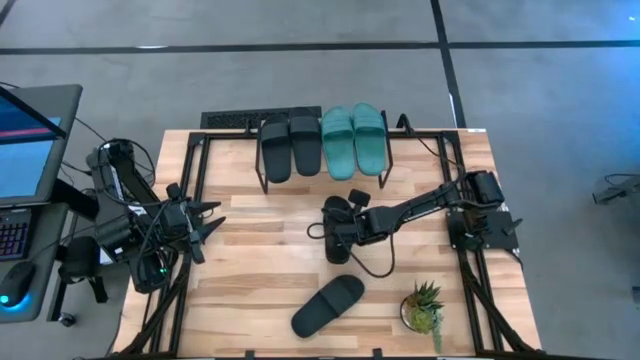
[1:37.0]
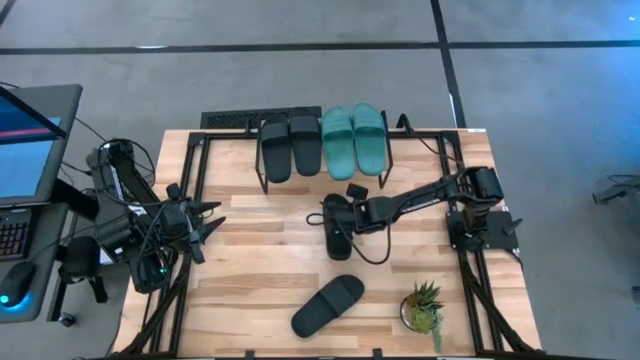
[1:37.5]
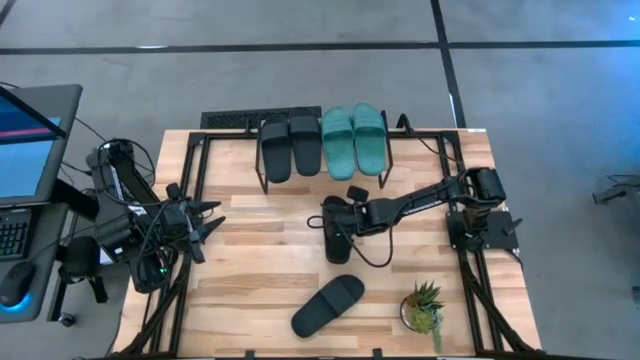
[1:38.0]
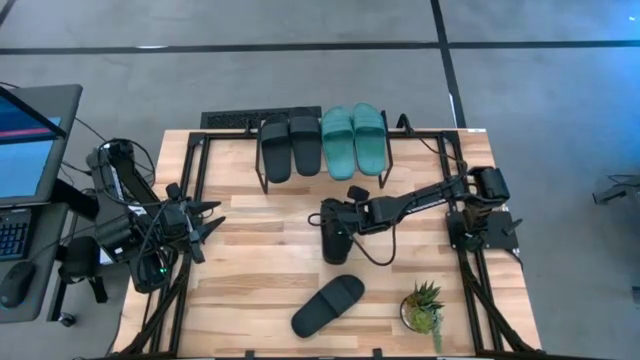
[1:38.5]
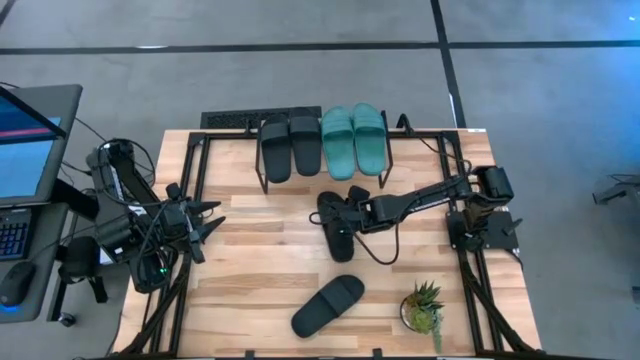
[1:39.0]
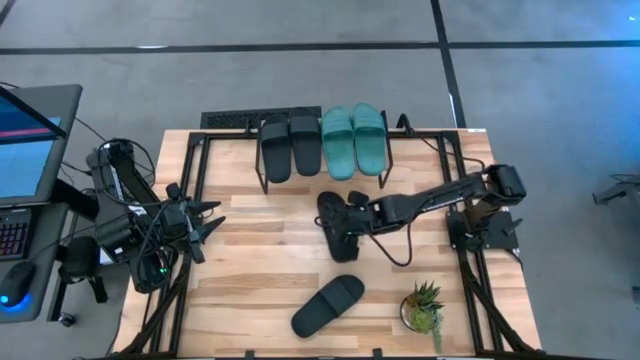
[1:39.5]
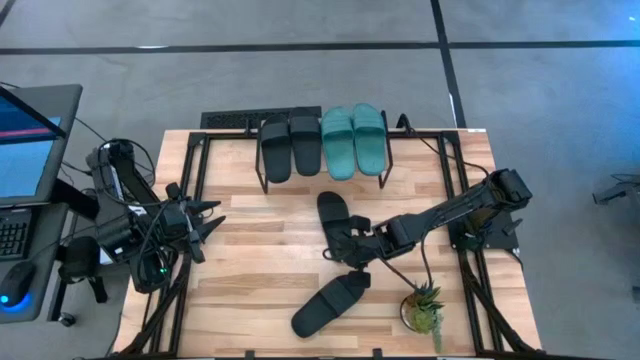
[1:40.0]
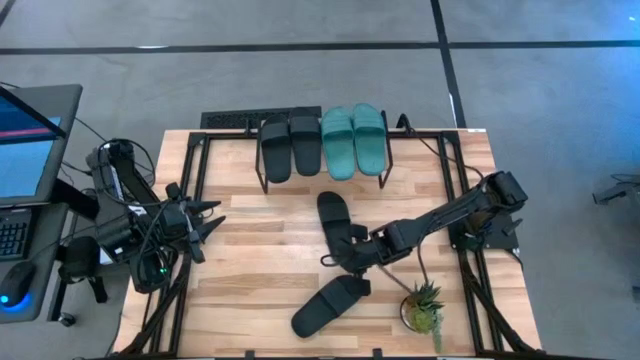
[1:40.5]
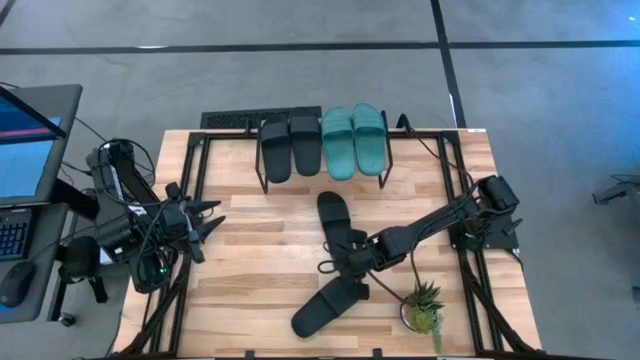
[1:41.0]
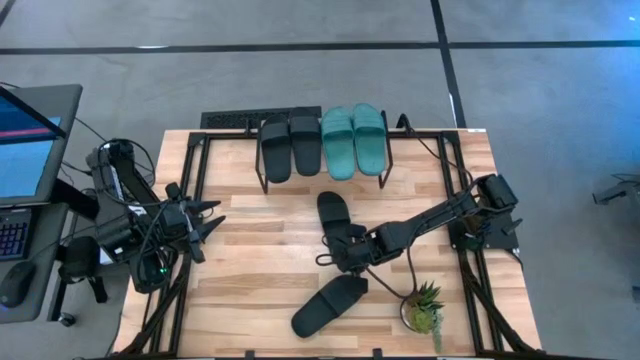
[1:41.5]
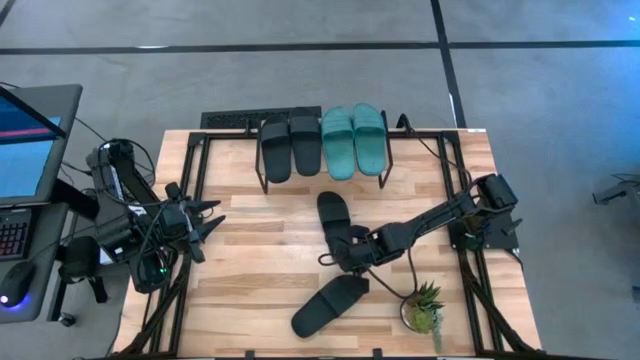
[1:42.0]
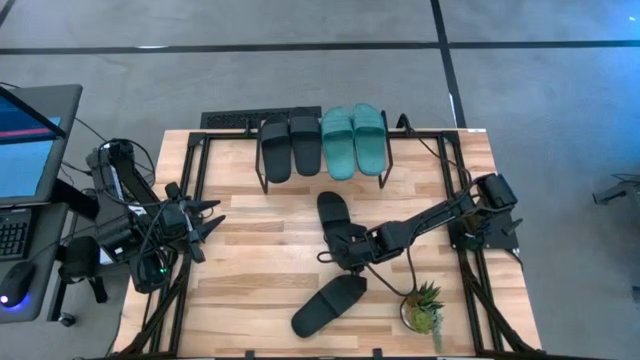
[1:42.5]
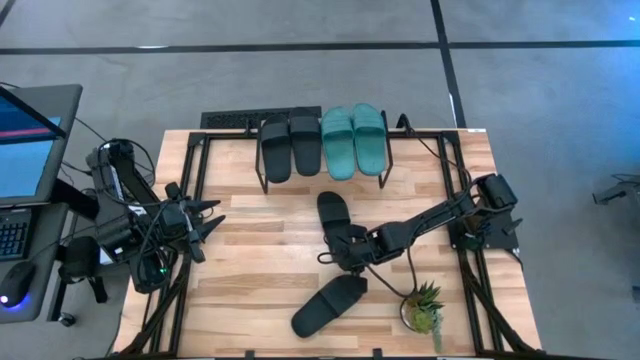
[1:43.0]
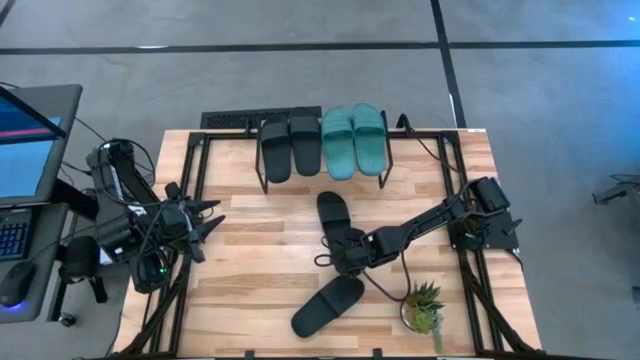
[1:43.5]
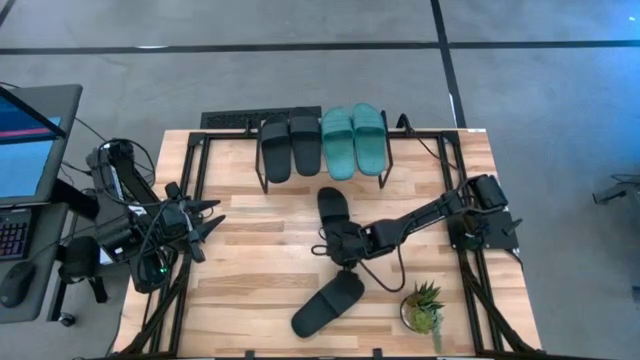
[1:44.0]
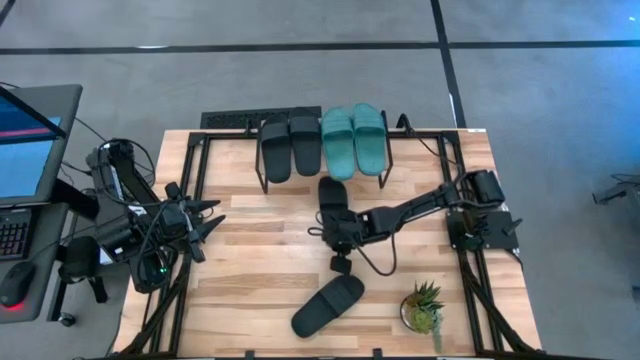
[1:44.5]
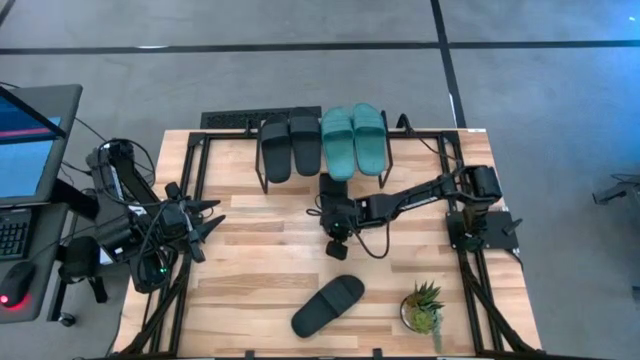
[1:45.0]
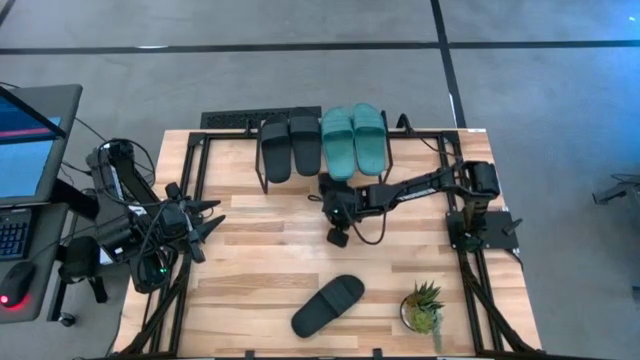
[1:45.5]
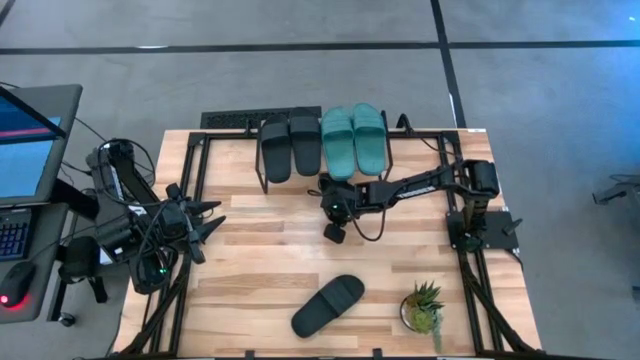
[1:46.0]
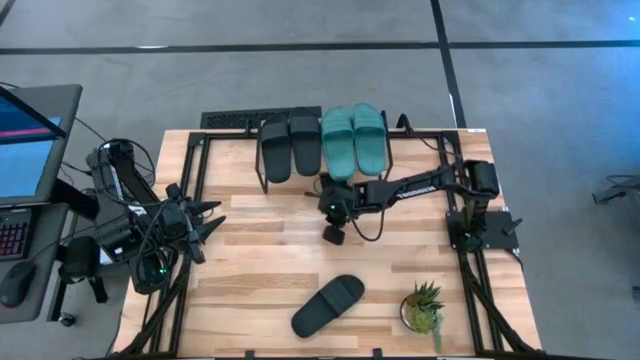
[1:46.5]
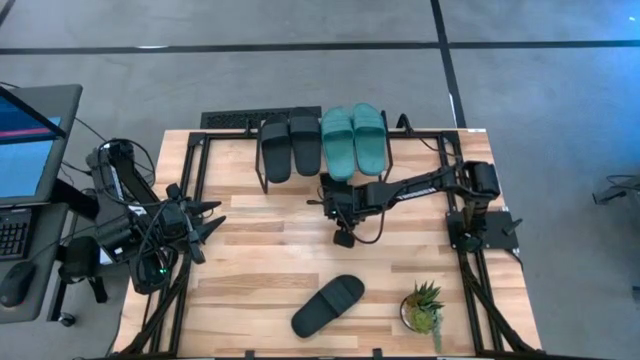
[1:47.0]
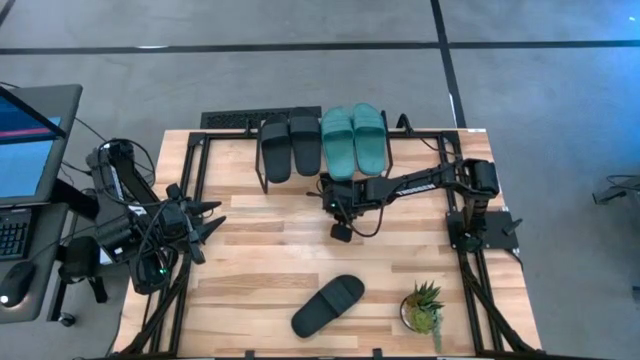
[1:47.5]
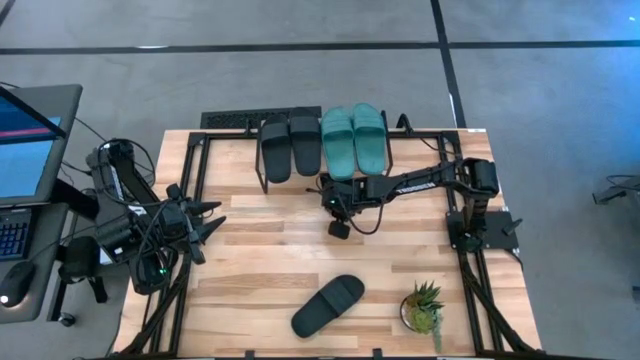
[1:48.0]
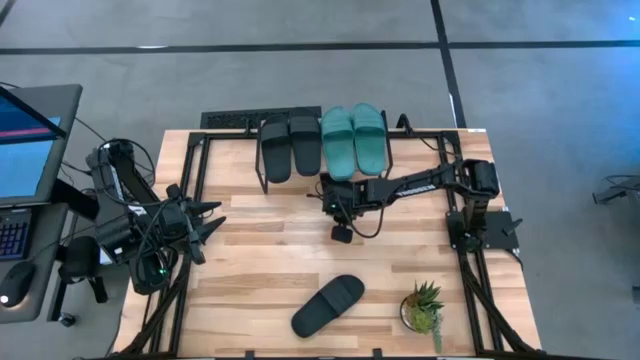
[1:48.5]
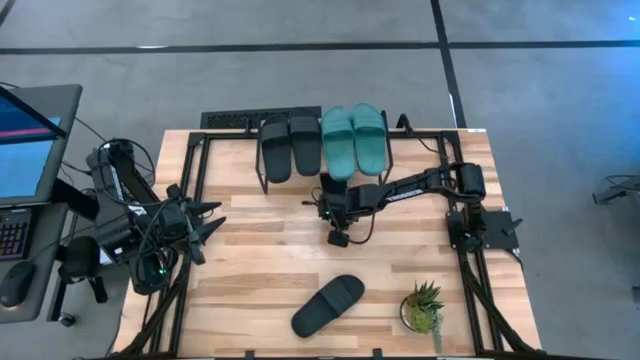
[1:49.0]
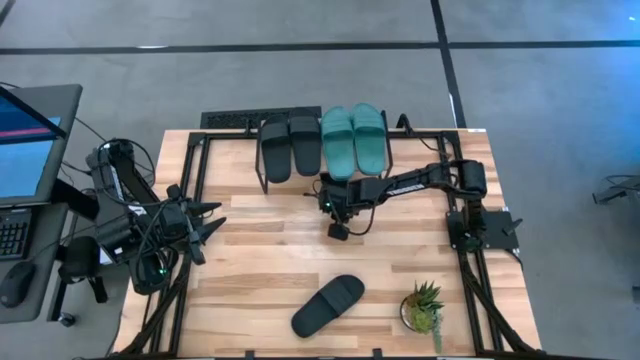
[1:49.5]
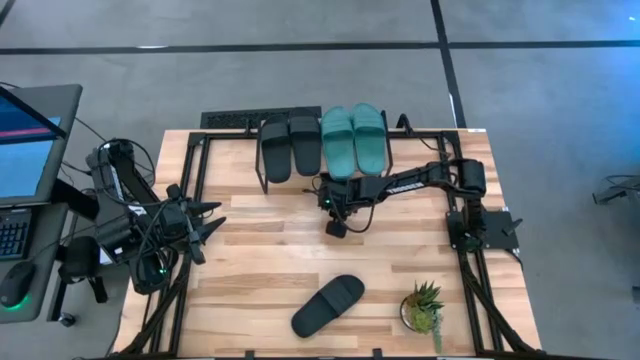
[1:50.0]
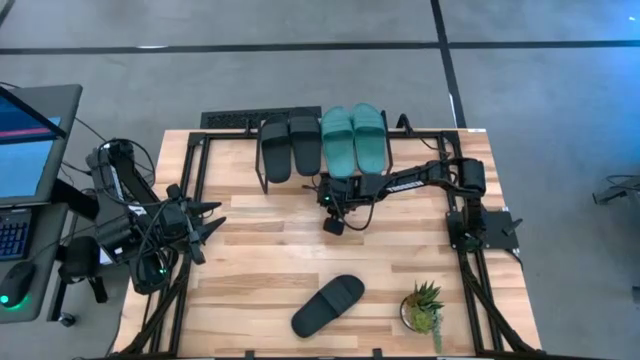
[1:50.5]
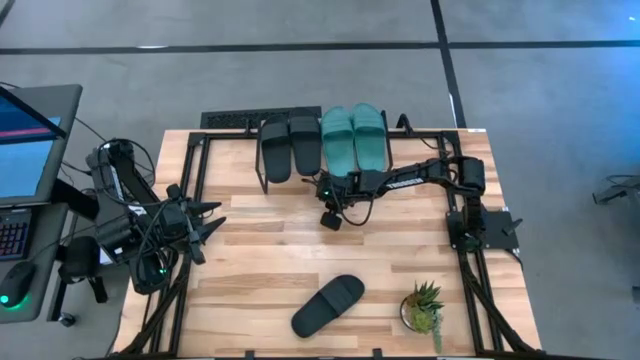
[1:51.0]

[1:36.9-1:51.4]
Task: Pick and place slides into the shelf
Put the black slipper under the shelf

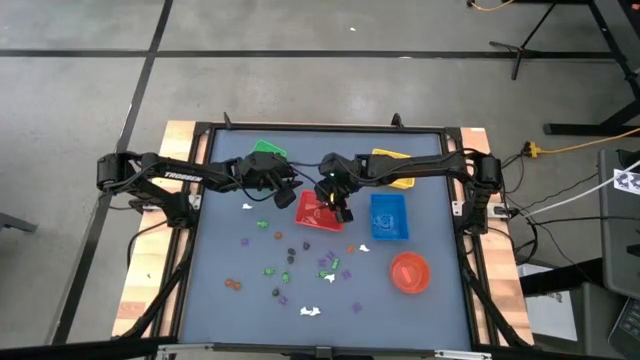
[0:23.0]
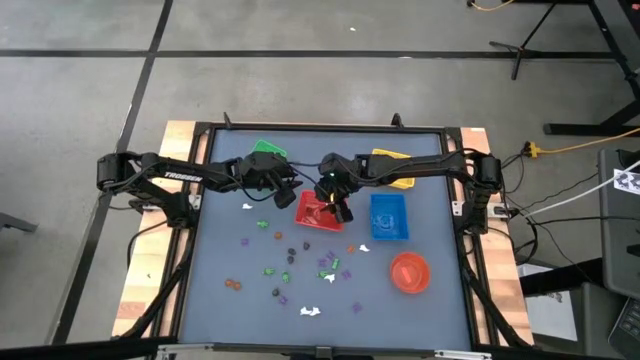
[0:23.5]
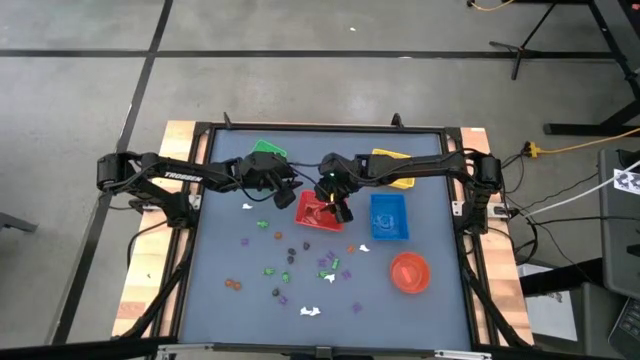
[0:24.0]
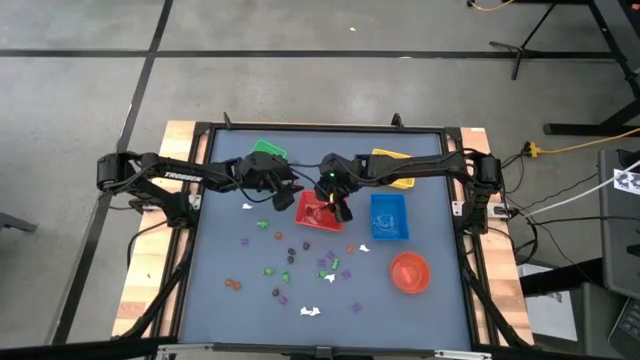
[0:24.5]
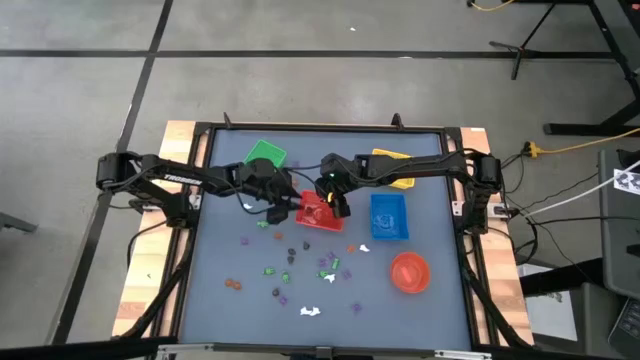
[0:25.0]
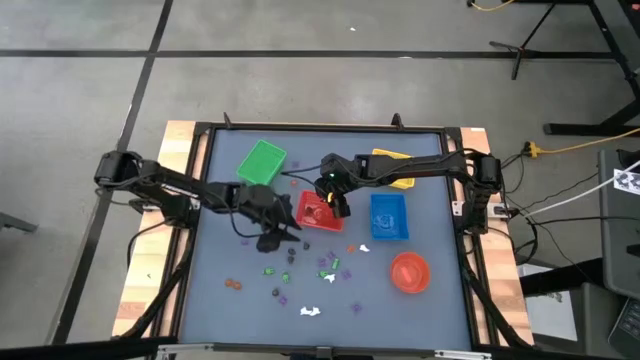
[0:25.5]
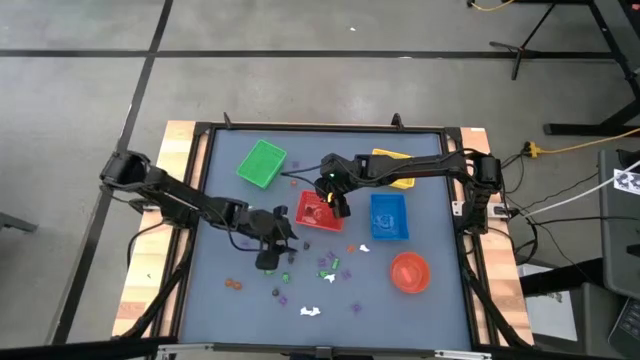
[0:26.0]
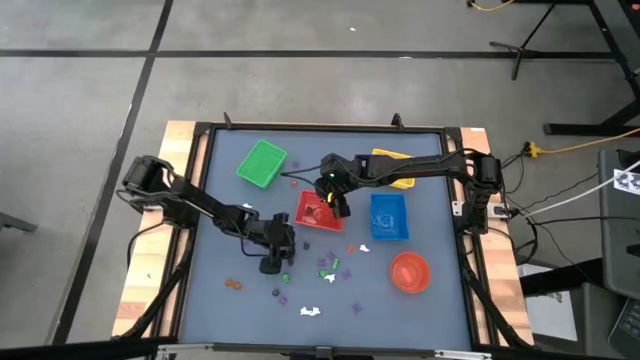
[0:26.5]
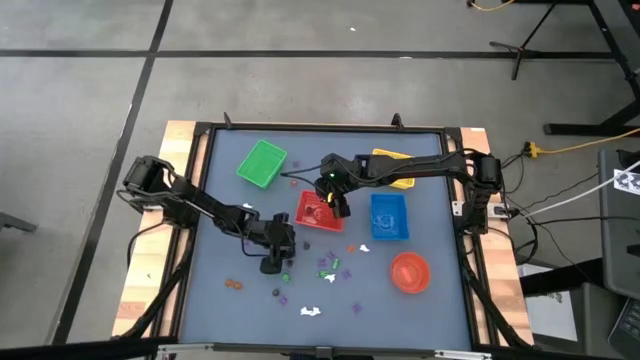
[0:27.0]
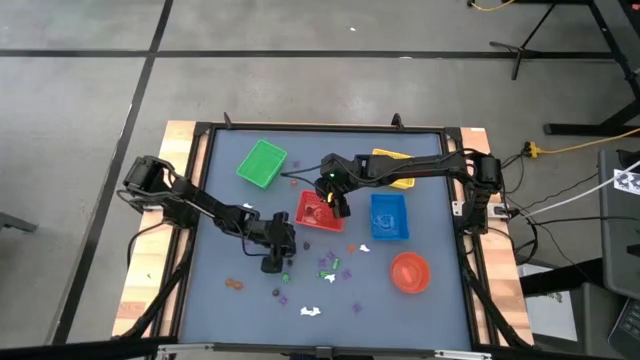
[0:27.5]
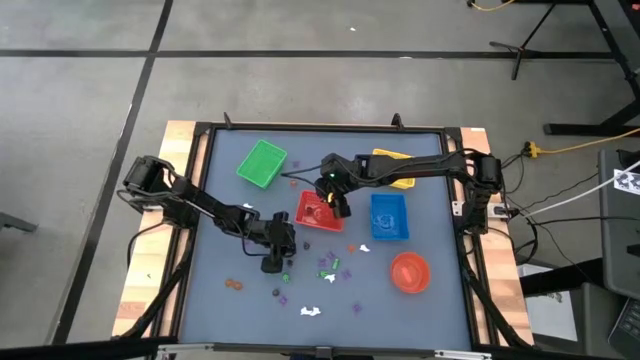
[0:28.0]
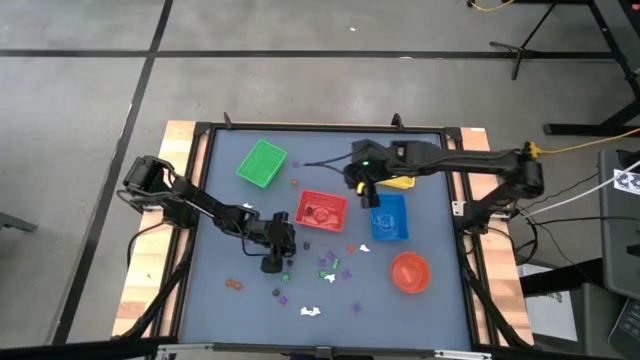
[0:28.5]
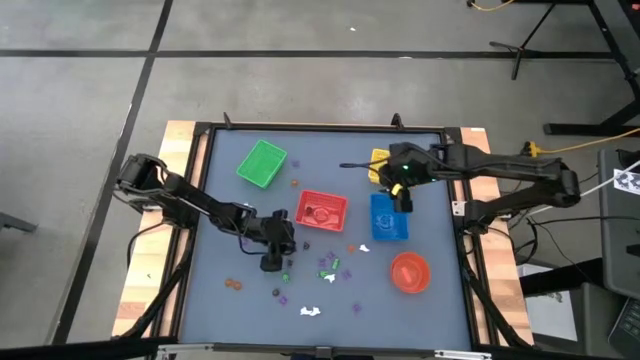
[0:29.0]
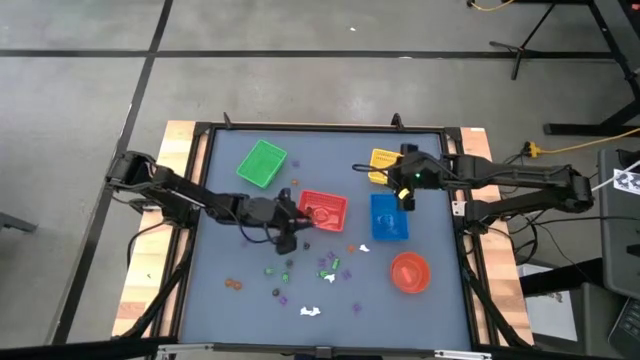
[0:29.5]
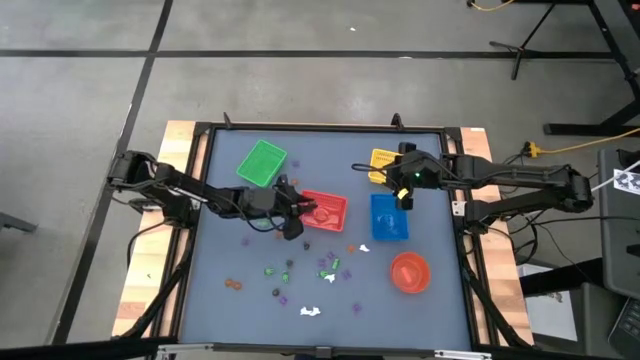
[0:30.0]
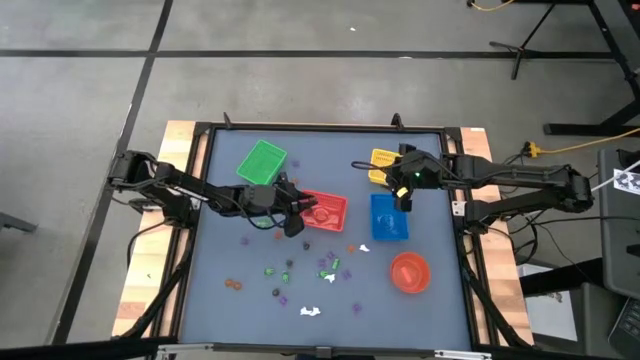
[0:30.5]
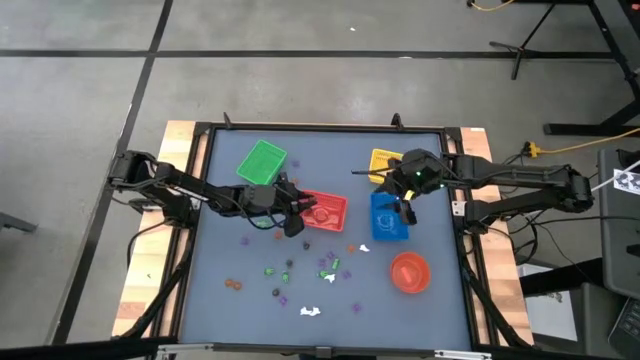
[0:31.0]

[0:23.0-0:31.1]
Task: Sort Halloween decoration
Put the black skull toy into the red bin
